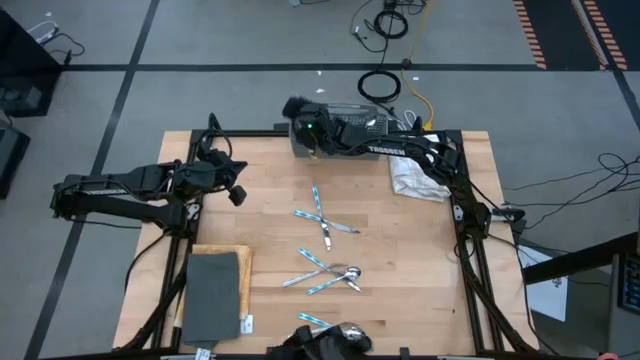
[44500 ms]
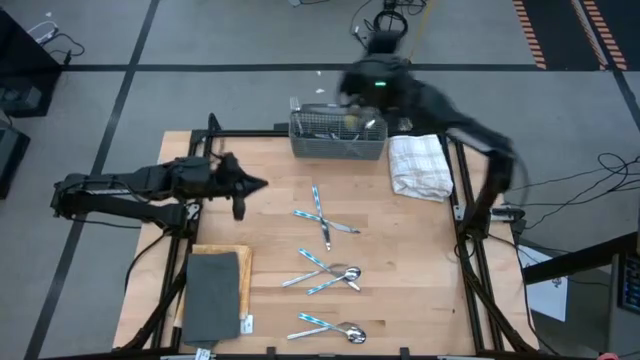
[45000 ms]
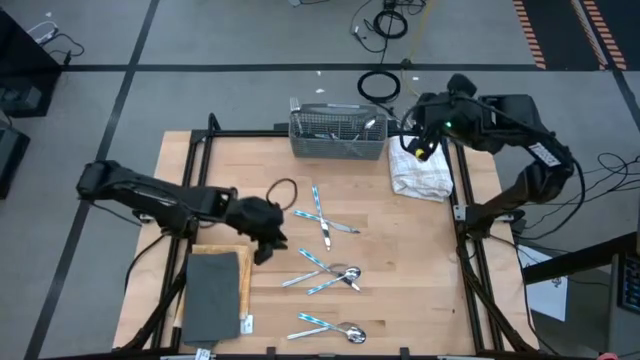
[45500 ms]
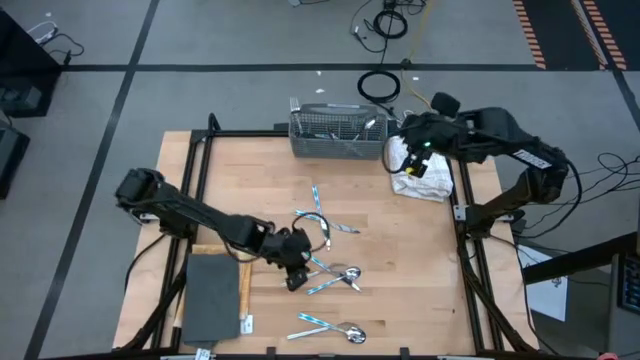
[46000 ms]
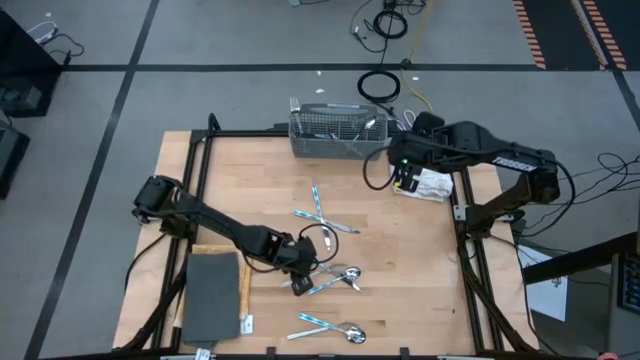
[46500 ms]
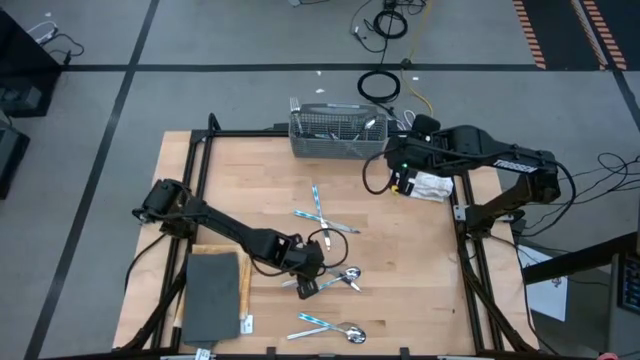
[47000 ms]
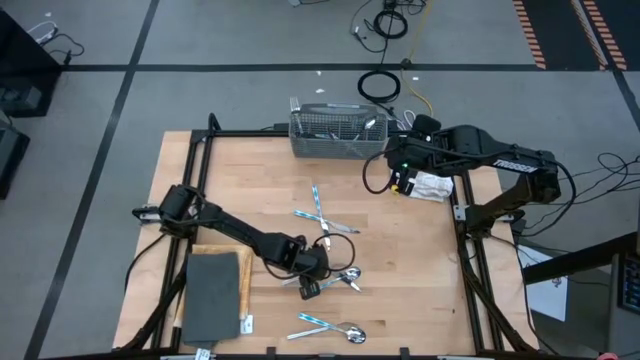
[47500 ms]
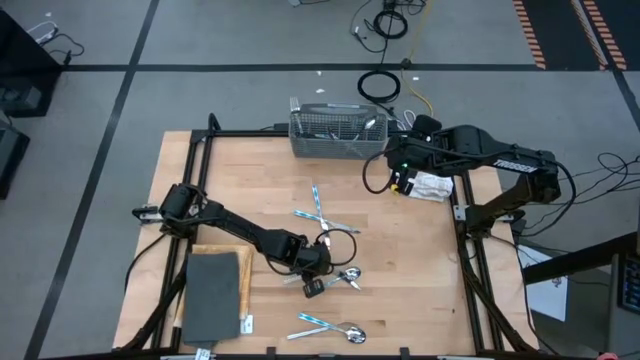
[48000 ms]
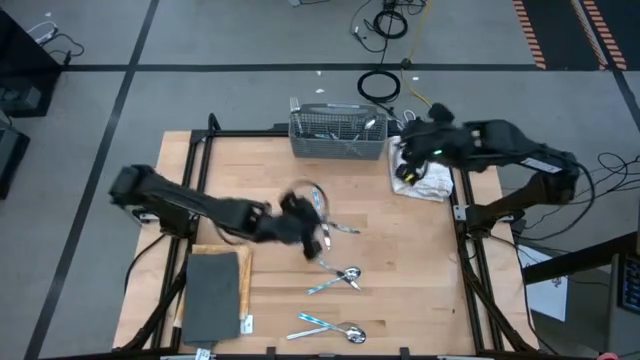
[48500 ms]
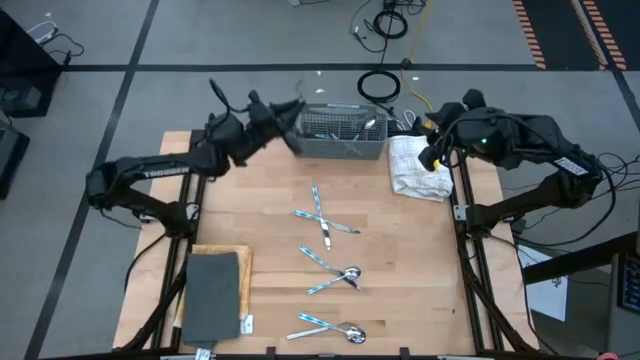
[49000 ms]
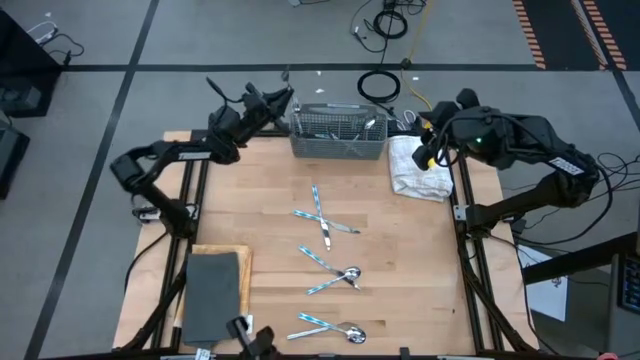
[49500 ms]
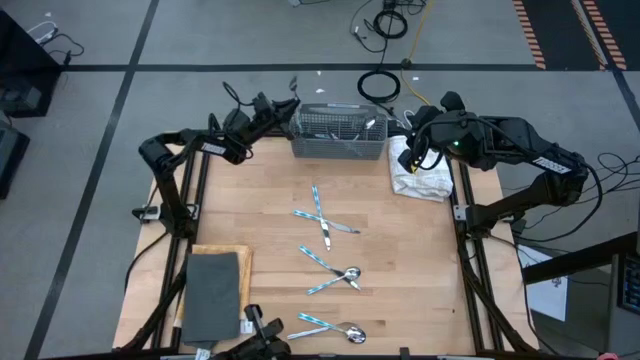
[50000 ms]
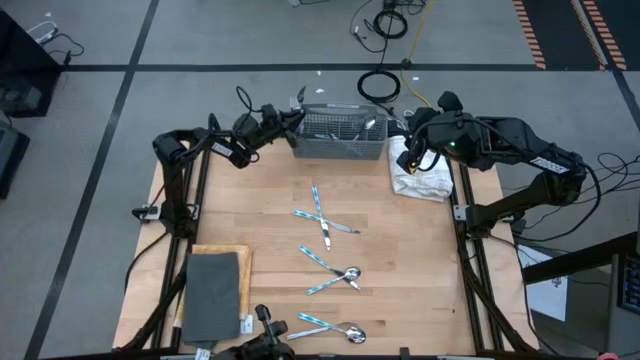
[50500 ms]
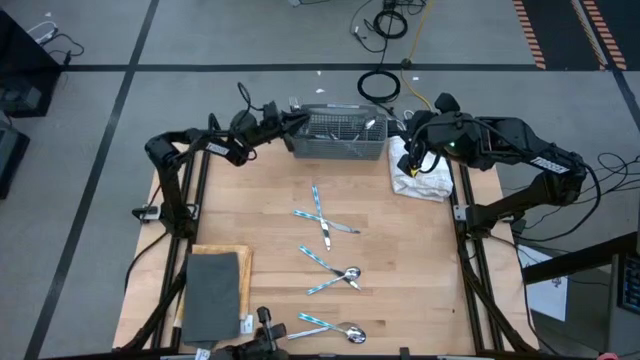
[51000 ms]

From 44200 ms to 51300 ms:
Task: Sort silverware
Put the fork into the silverware basket

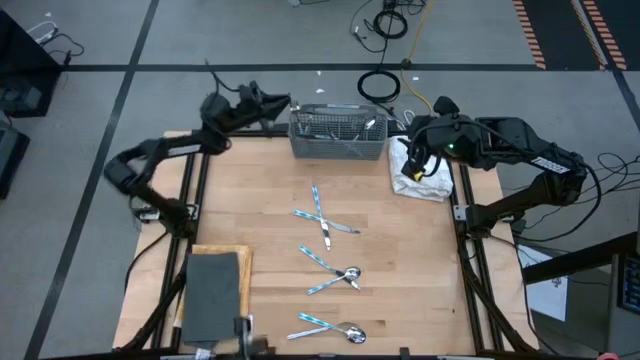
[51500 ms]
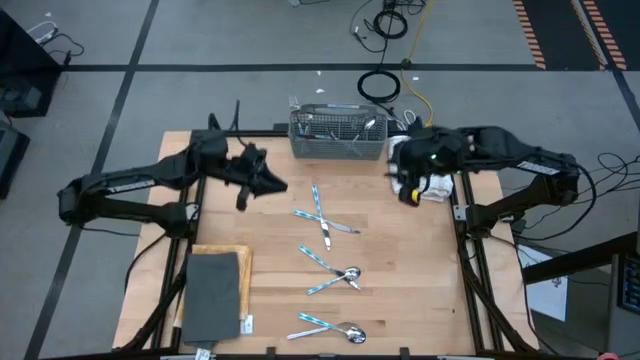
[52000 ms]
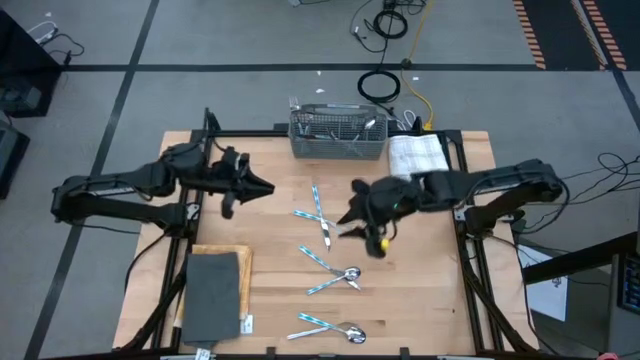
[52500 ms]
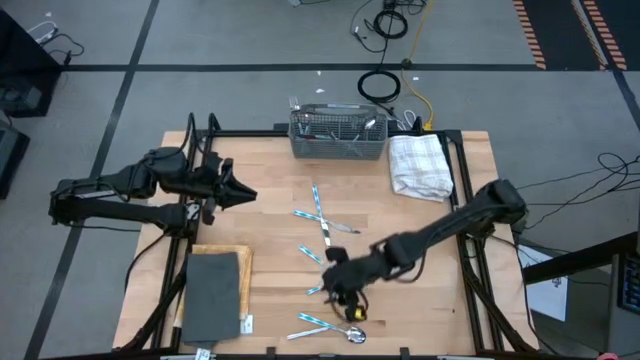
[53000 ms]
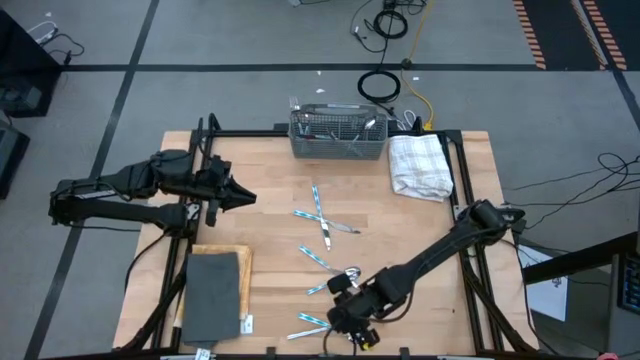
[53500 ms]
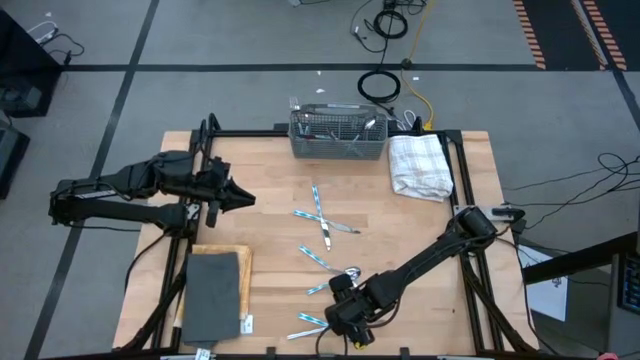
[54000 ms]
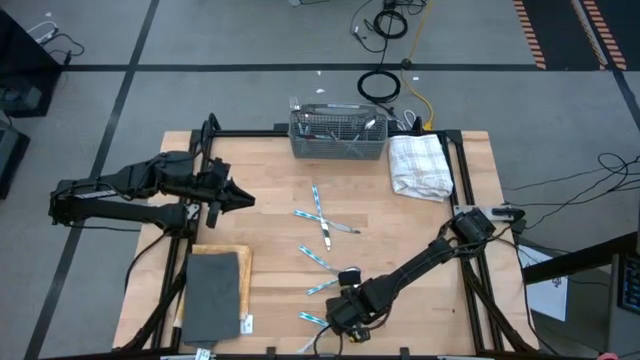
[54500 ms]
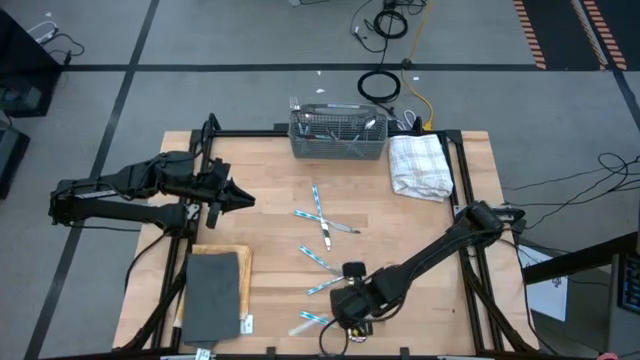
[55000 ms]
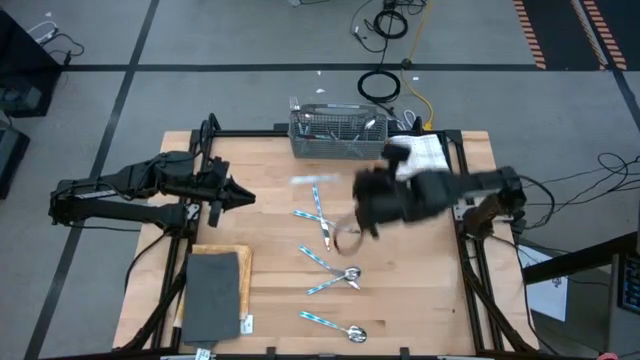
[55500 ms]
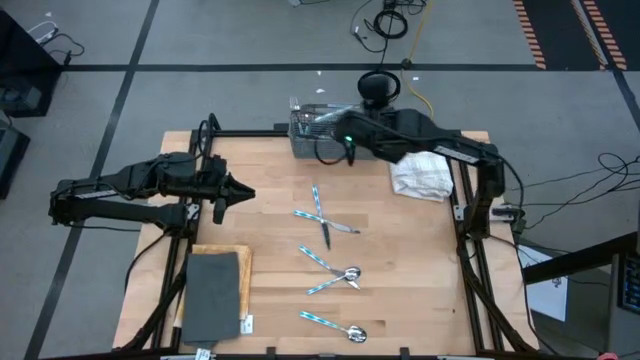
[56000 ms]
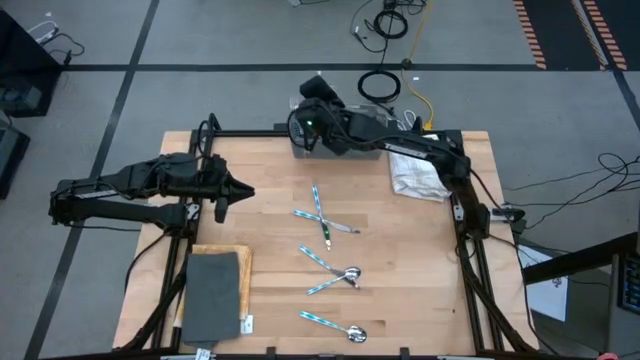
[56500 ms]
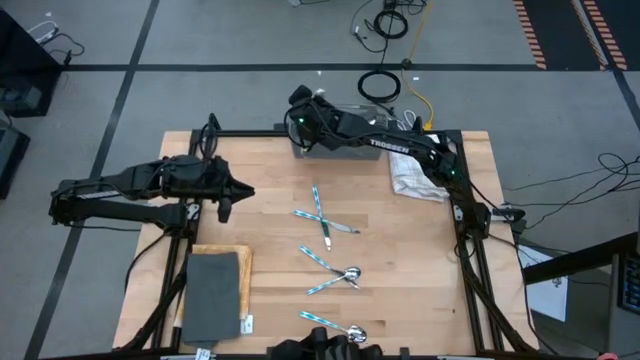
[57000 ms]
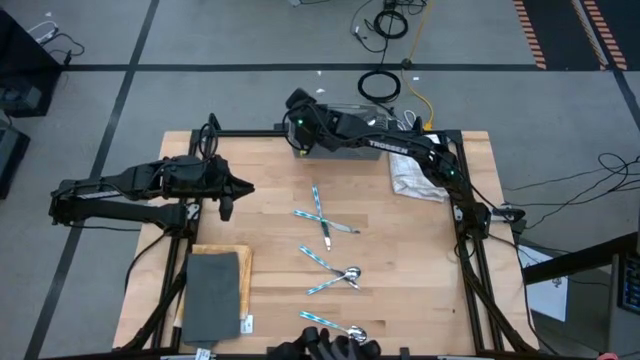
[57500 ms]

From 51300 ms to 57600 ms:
Put the fork into the silverware basket

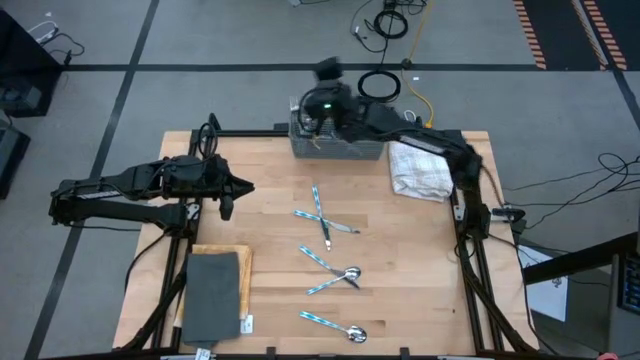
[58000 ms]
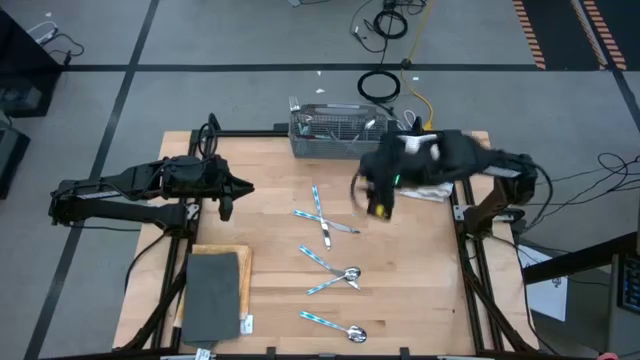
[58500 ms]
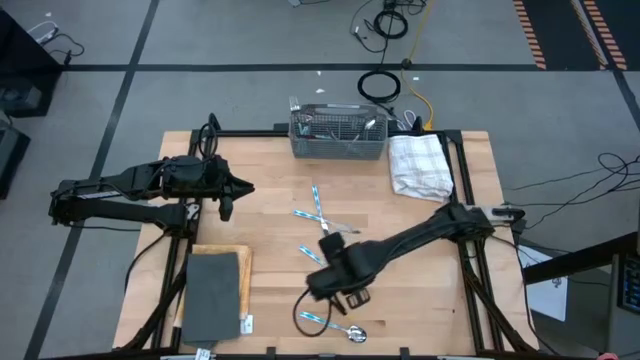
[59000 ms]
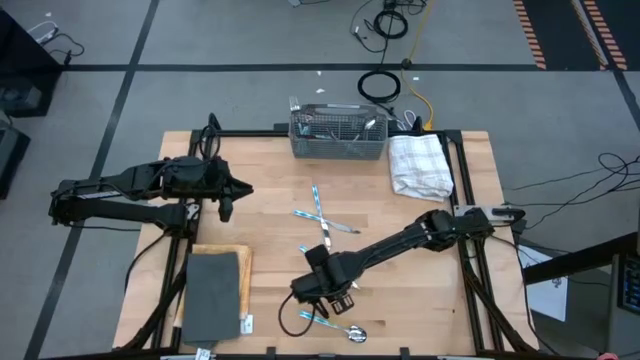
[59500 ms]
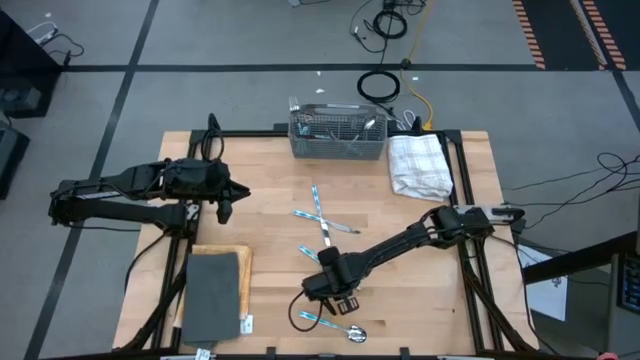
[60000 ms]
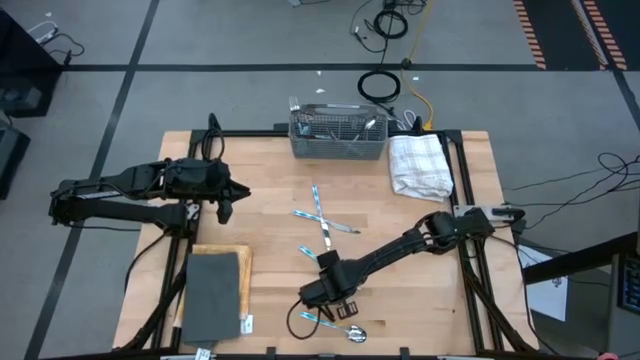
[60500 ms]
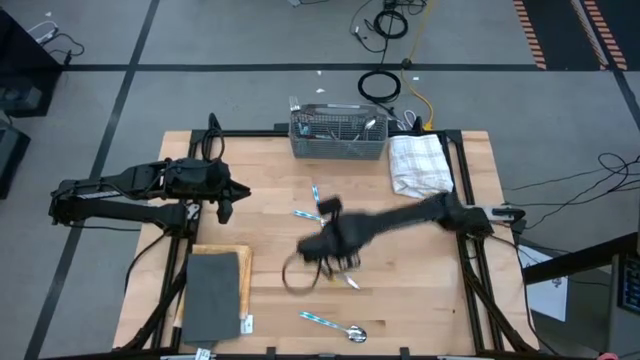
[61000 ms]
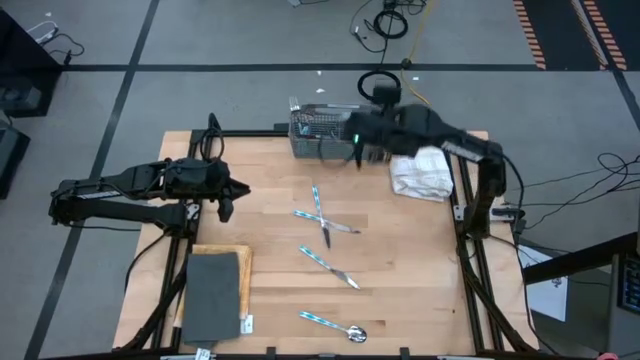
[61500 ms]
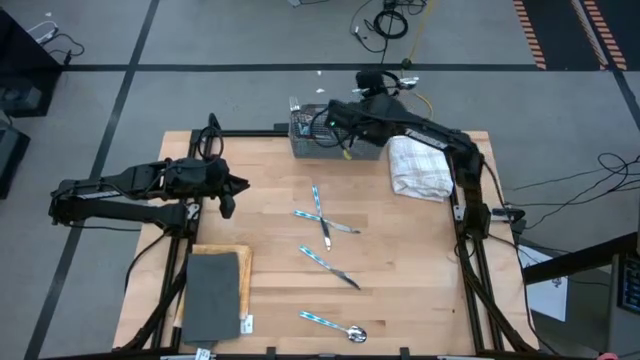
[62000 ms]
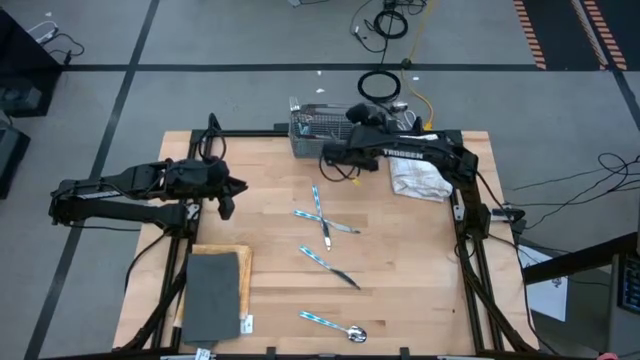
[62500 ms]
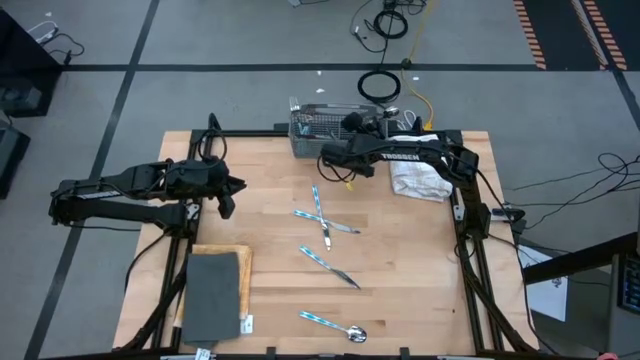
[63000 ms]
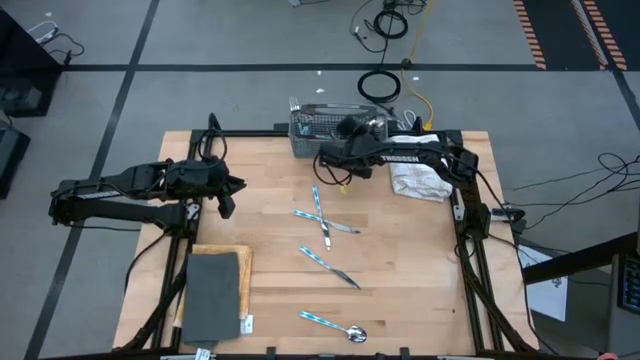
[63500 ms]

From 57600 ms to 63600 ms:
Put the spoon into the silverware basket

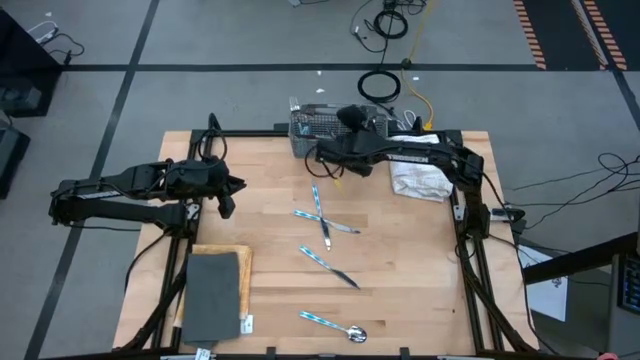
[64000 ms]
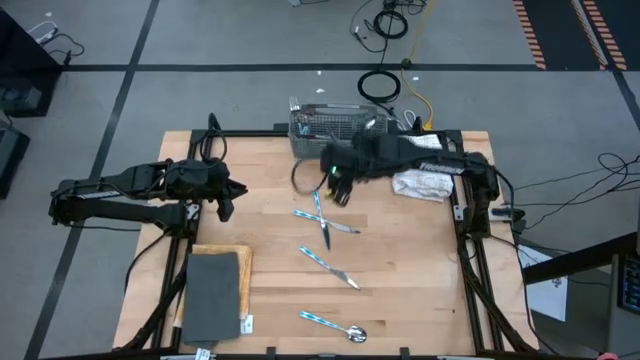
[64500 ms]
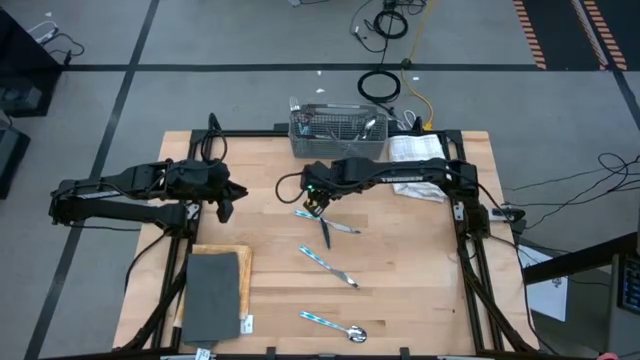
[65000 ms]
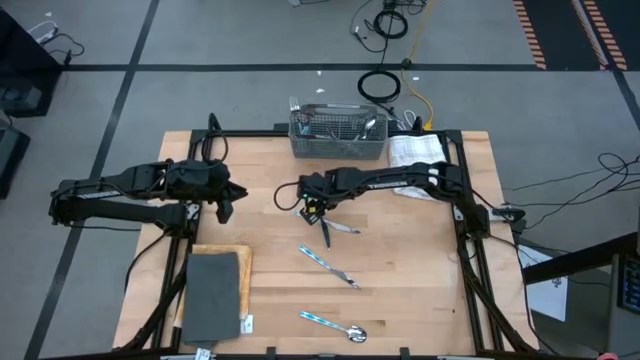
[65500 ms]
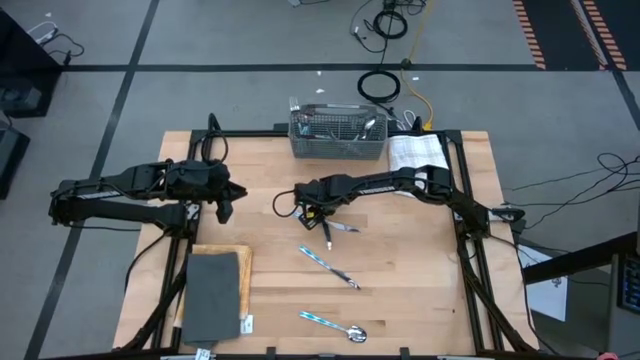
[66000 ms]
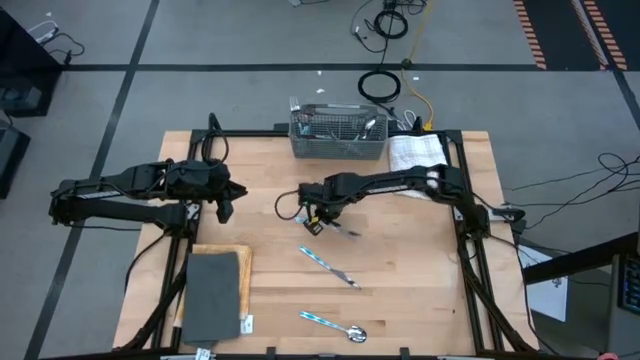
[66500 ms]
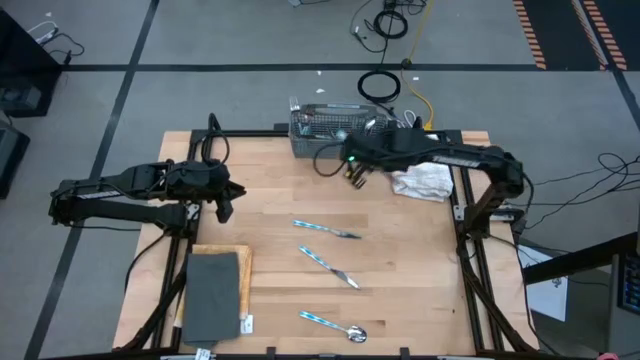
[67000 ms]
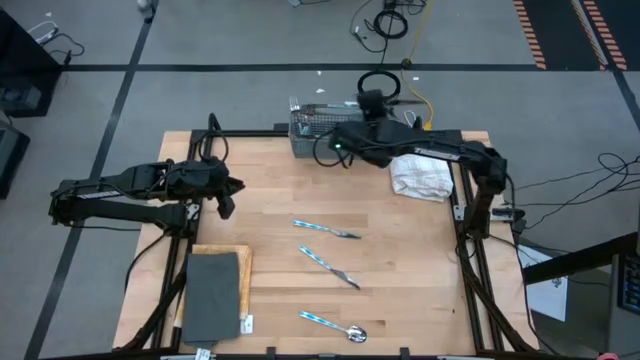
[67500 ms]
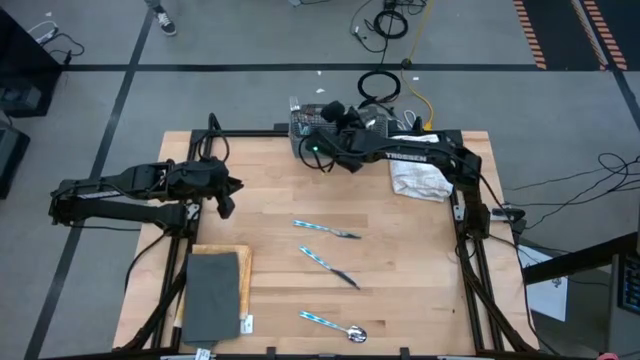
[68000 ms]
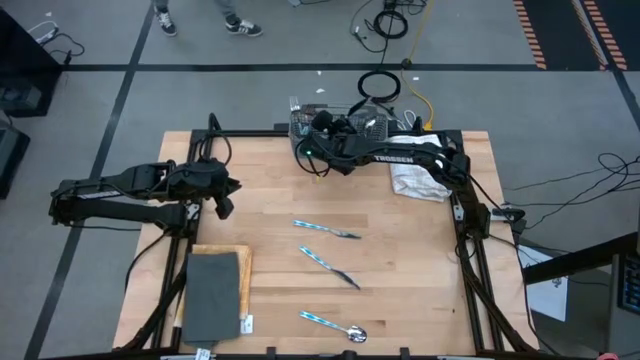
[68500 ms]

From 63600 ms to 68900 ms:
Put the knife into the silverware basket
